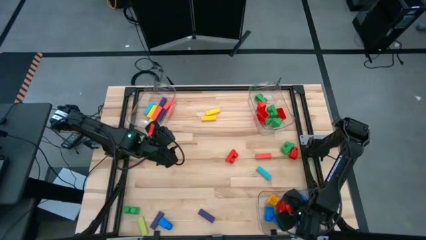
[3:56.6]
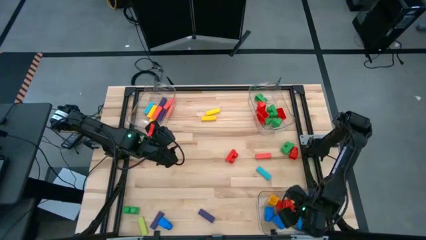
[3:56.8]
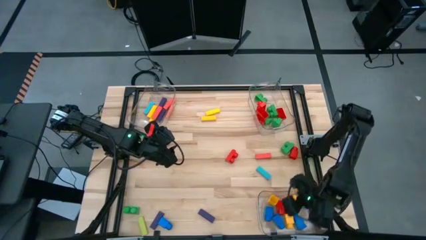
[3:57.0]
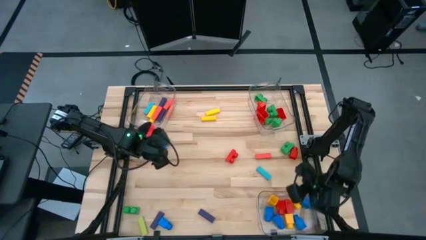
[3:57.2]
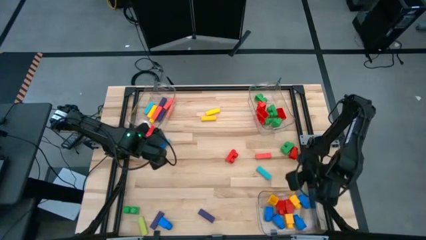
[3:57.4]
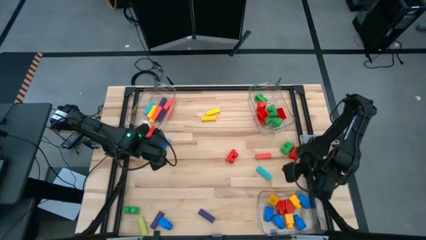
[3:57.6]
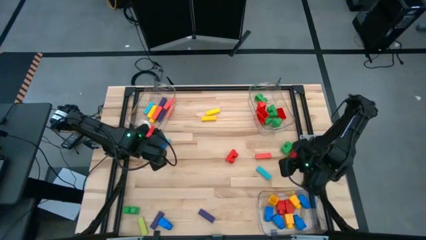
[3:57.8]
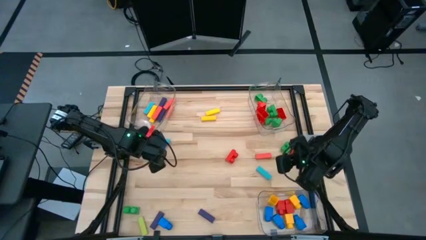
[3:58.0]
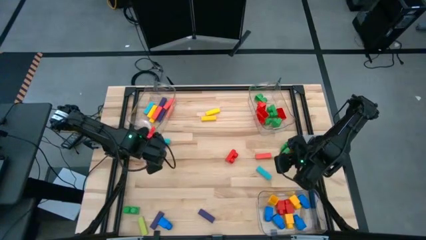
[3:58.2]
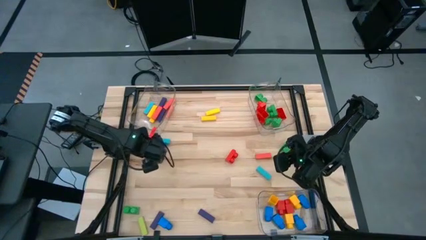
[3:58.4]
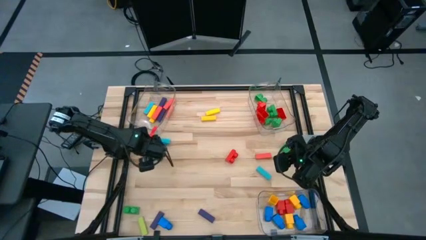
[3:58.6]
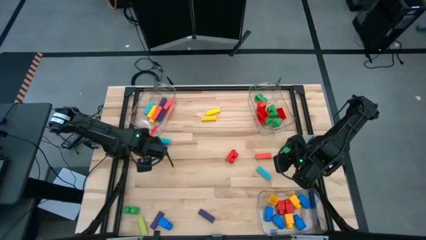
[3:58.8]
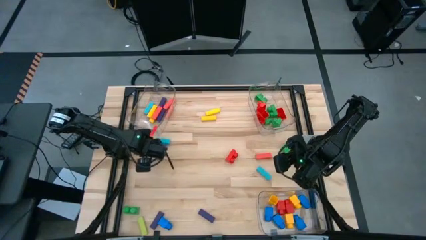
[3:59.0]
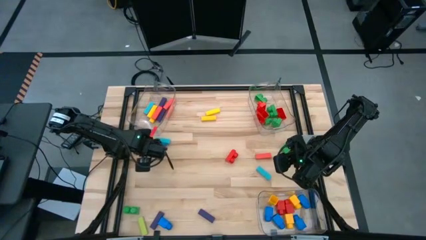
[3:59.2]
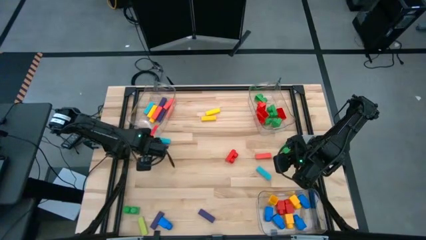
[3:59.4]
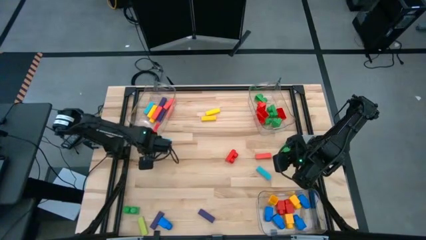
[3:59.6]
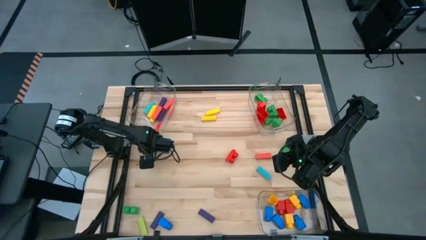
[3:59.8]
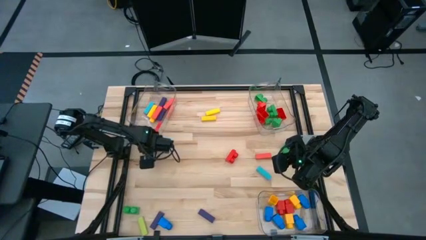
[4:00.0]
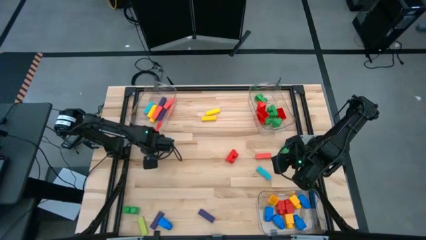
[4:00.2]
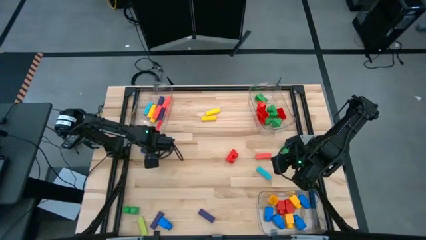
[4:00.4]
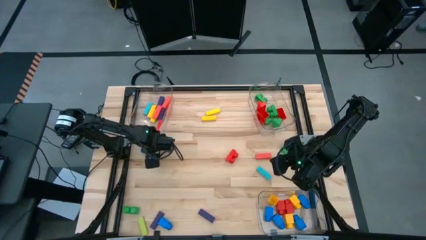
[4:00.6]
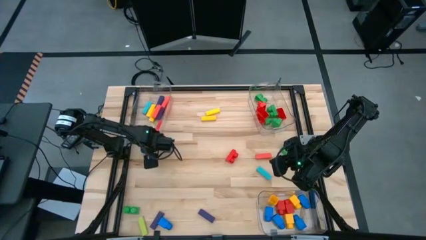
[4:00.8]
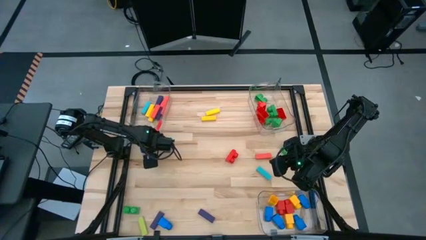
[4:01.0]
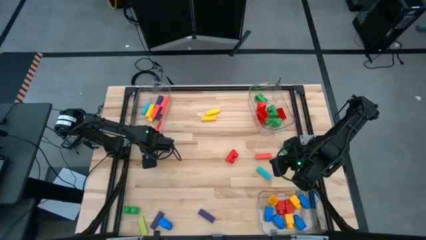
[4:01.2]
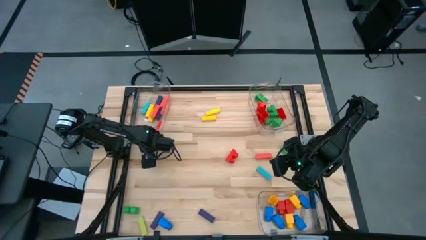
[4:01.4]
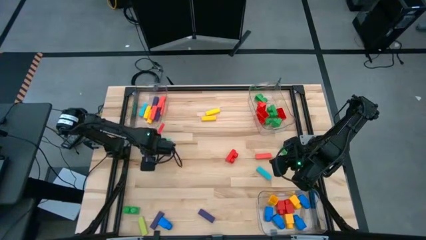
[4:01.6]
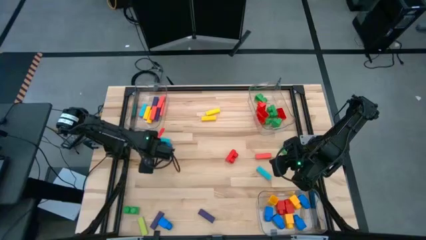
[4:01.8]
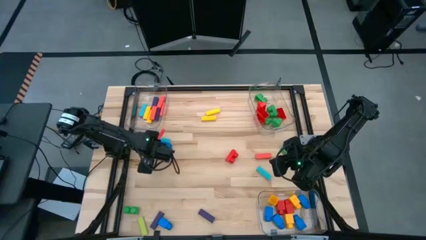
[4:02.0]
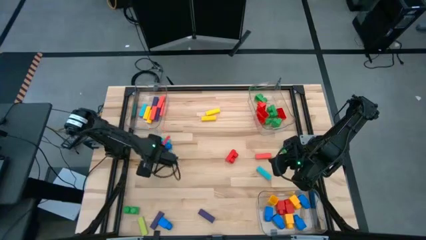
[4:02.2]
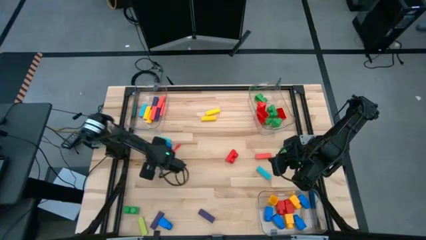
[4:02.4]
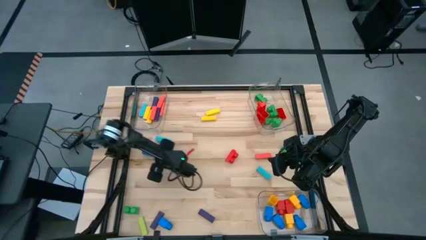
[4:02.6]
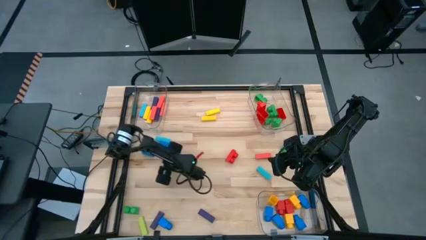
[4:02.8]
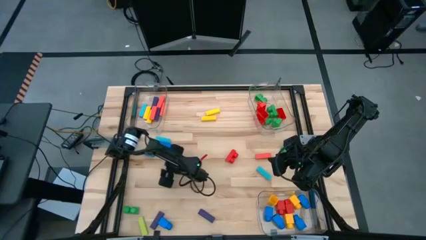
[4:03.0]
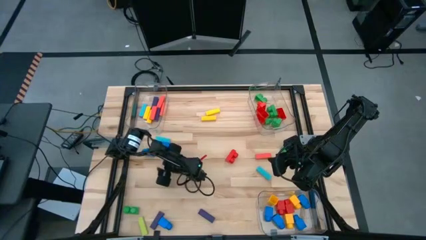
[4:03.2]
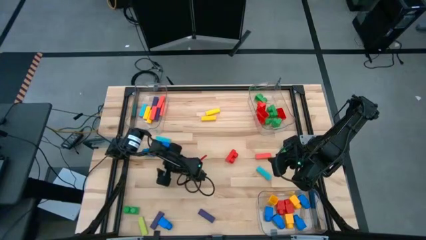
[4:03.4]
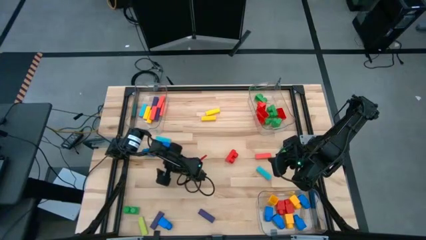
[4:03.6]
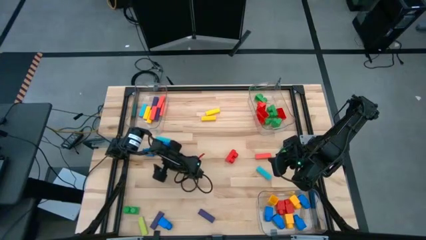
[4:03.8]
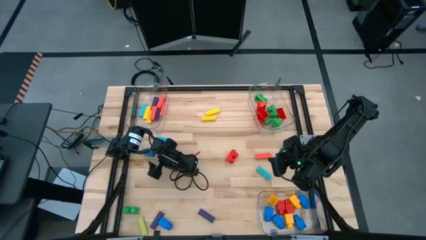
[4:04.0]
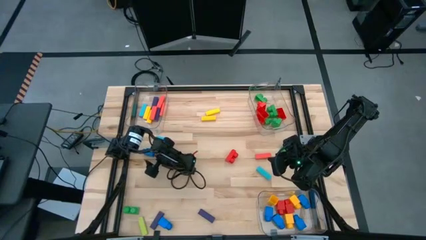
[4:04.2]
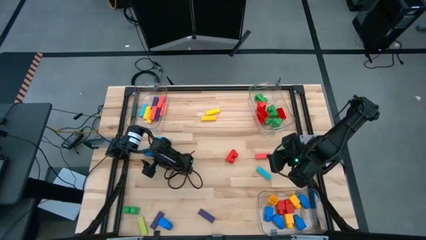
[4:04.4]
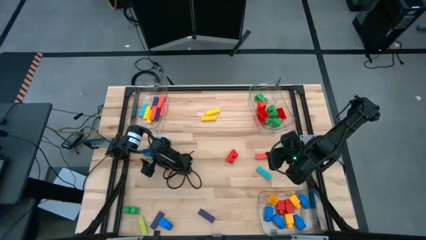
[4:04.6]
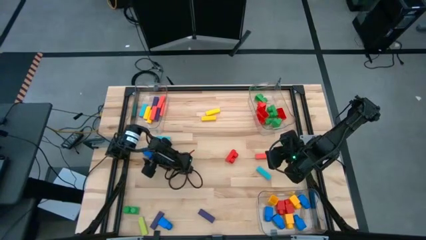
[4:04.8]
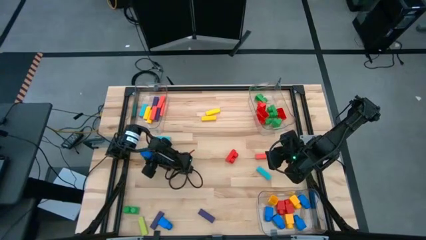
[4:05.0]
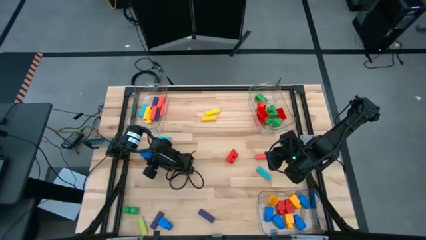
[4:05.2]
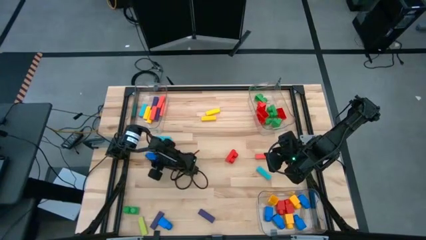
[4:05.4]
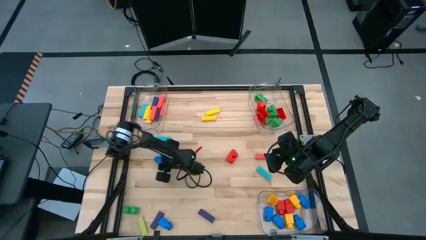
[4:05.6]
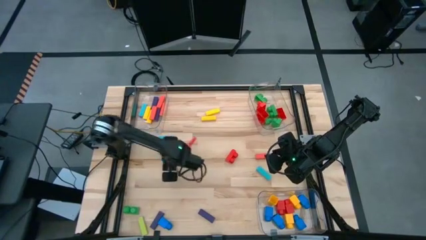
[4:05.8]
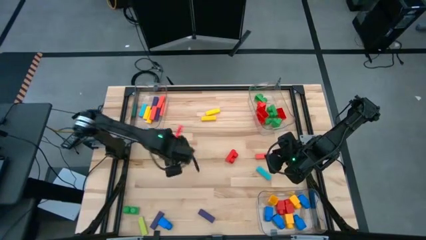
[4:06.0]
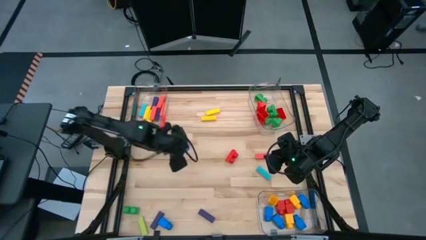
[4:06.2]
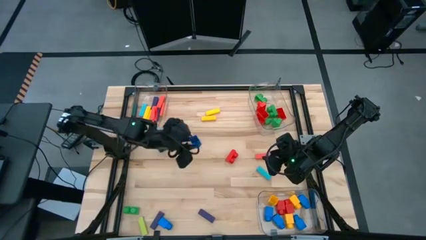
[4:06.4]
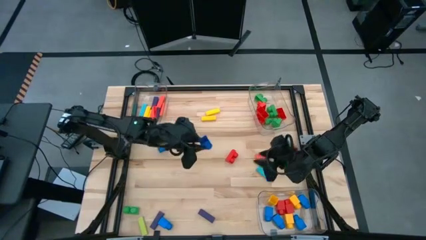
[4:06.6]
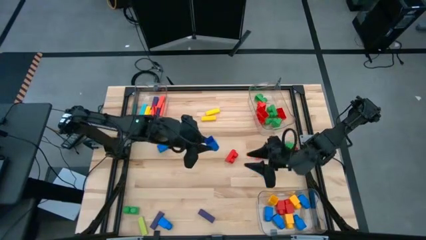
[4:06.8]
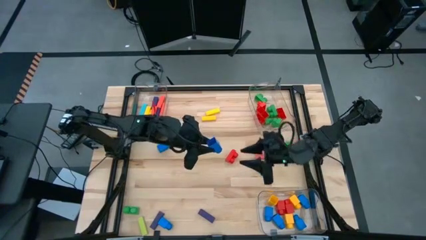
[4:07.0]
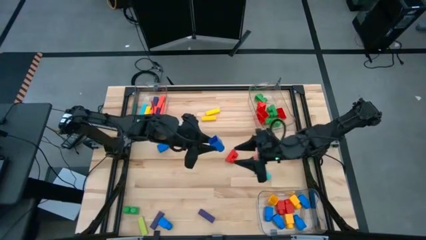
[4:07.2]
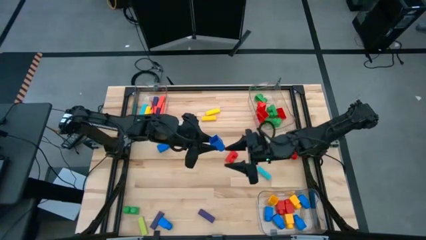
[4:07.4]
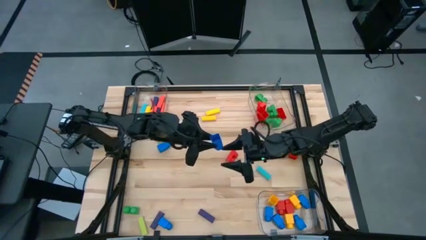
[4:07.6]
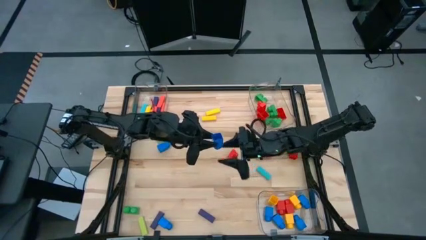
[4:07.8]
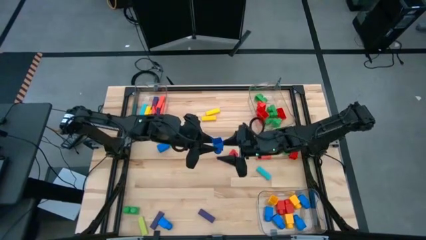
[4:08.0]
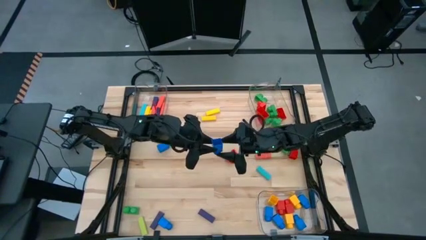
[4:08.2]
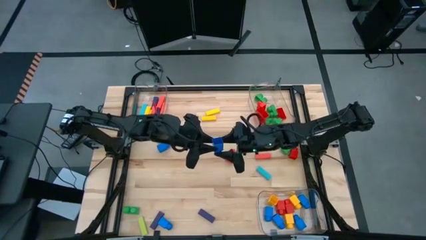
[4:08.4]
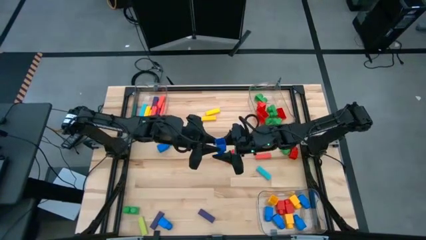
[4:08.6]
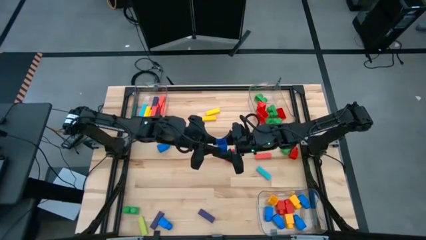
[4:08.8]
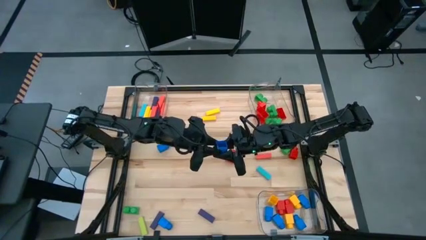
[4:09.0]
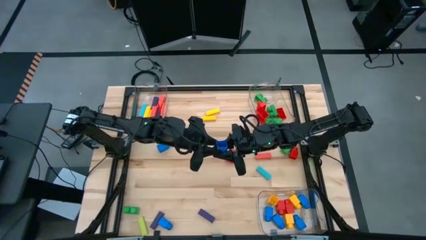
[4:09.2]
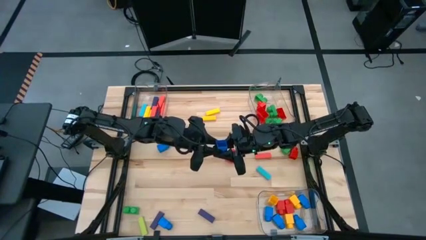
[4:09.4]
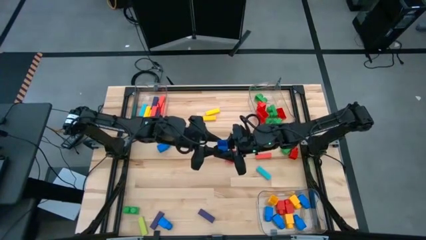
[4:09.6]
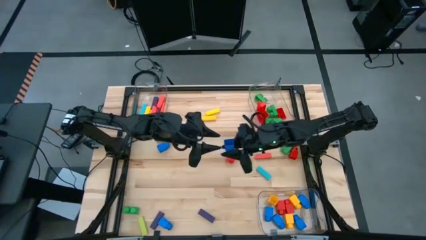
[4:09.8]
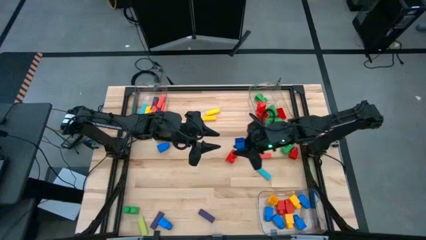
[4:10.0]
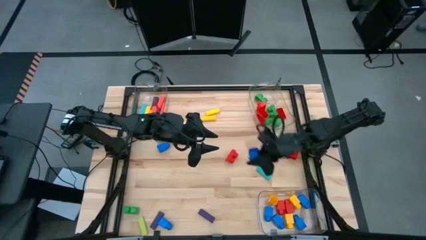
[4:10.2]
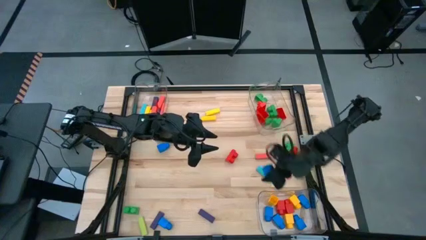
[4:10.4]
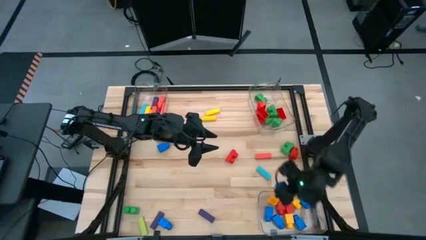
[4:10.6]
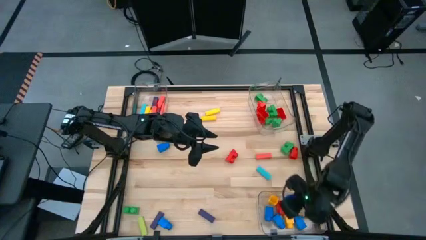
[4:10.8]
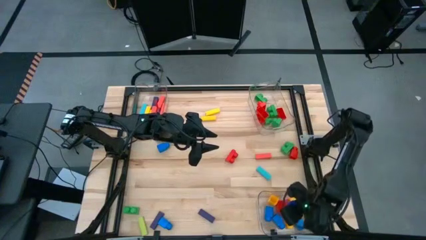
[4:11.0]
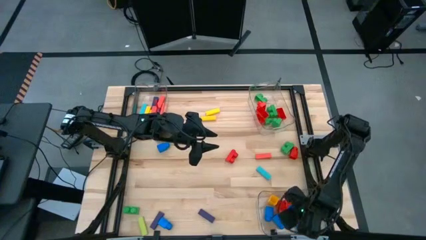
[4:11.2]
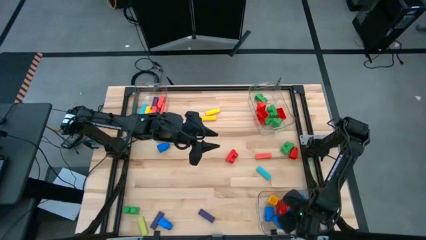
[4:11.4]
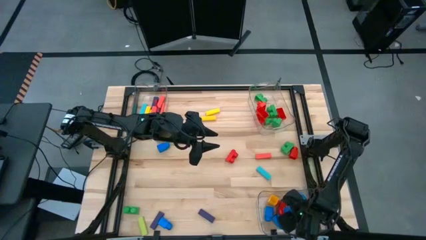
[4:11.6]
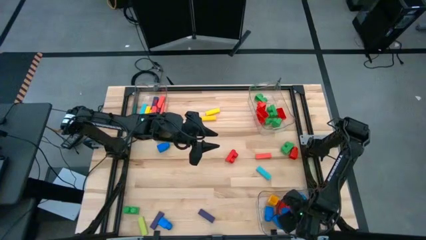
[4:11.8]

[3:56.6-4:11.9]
Task: Sort blocks by size
Put the blue 1 stud game piece into the bottom transparent bin
